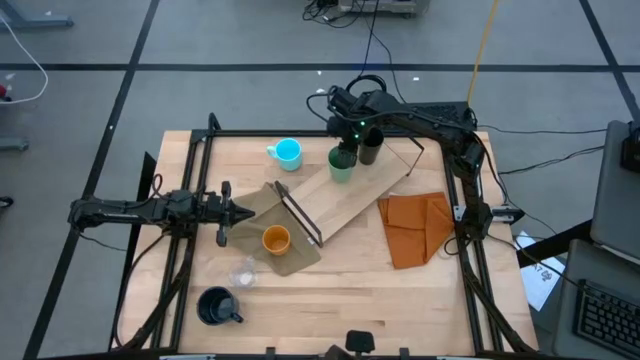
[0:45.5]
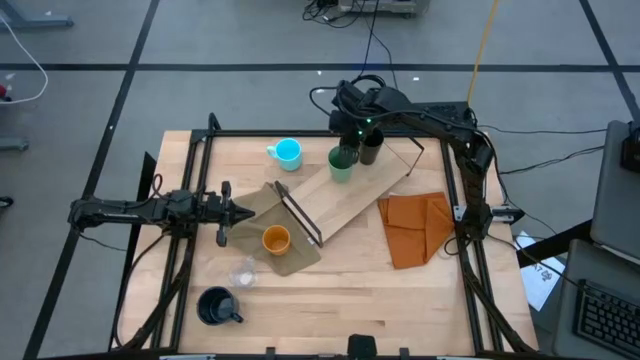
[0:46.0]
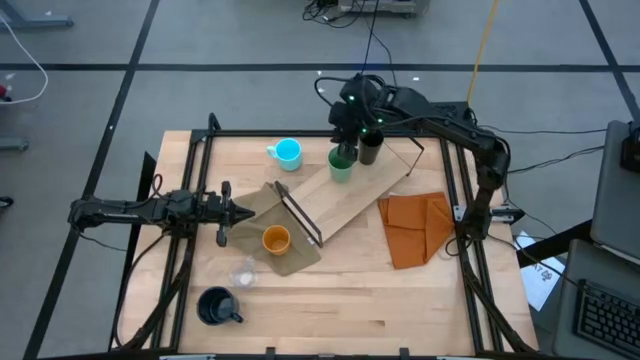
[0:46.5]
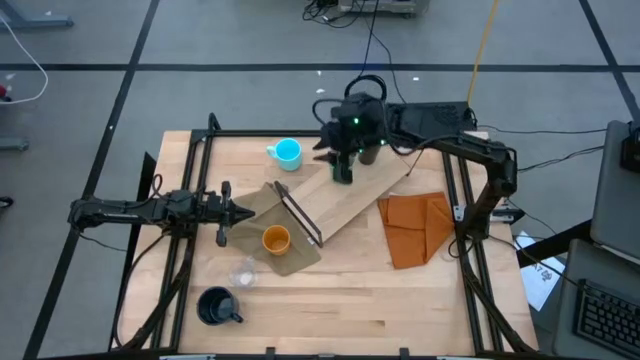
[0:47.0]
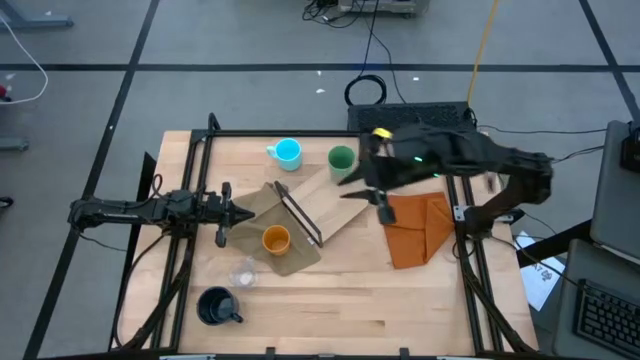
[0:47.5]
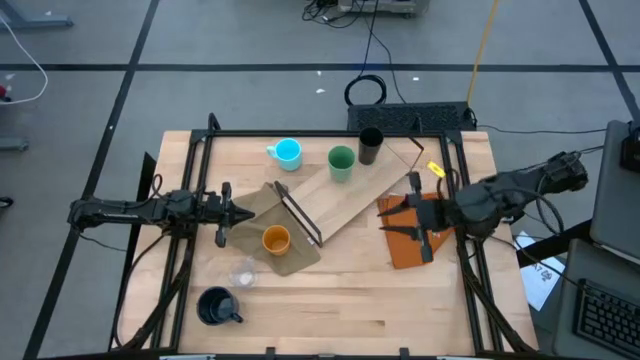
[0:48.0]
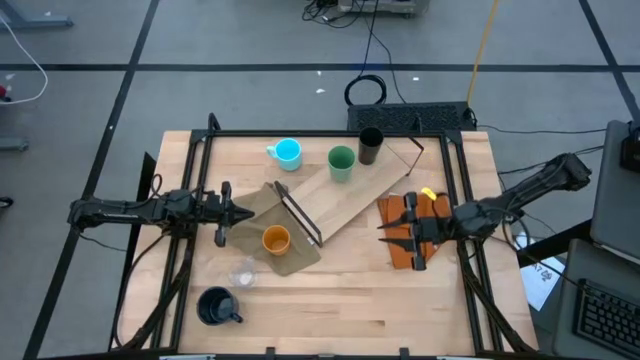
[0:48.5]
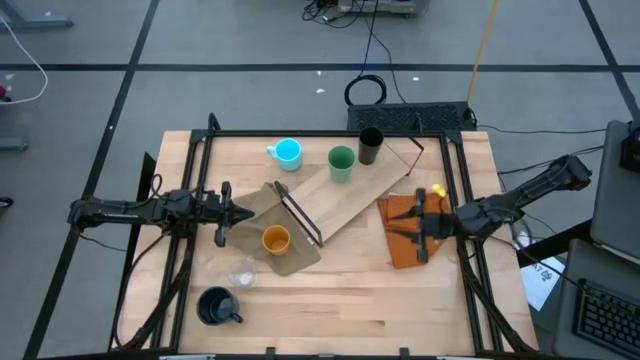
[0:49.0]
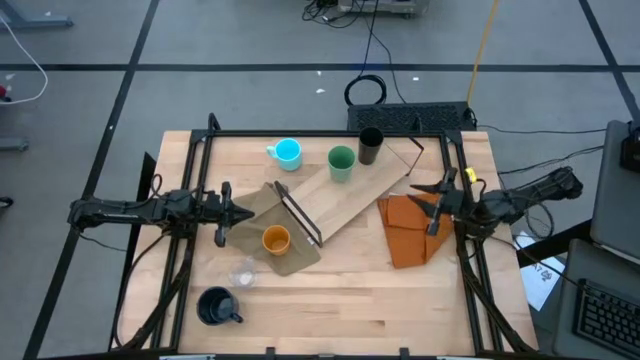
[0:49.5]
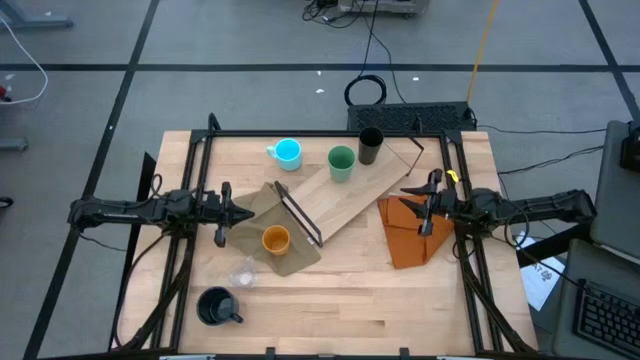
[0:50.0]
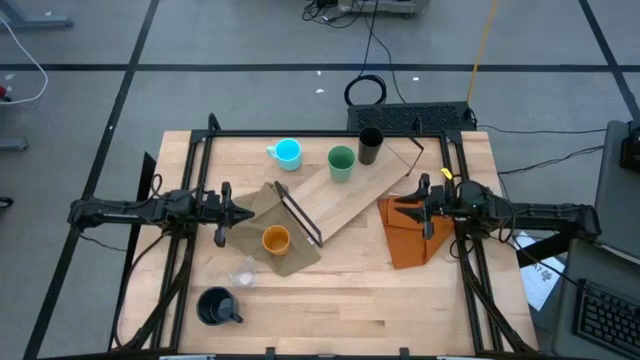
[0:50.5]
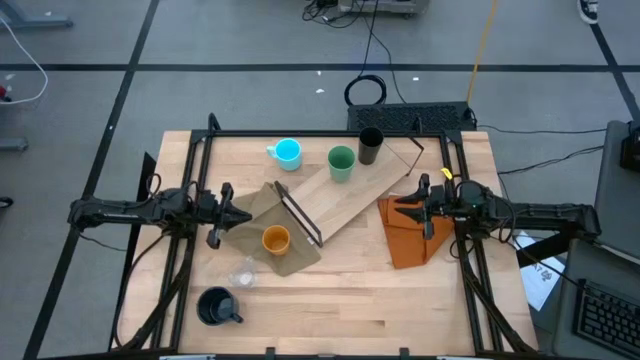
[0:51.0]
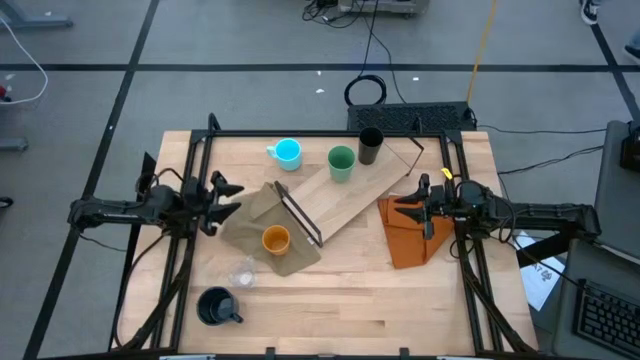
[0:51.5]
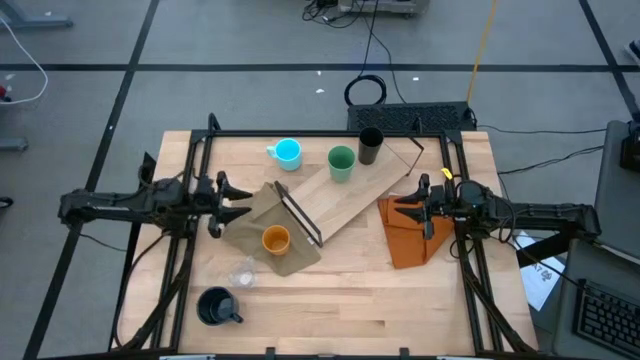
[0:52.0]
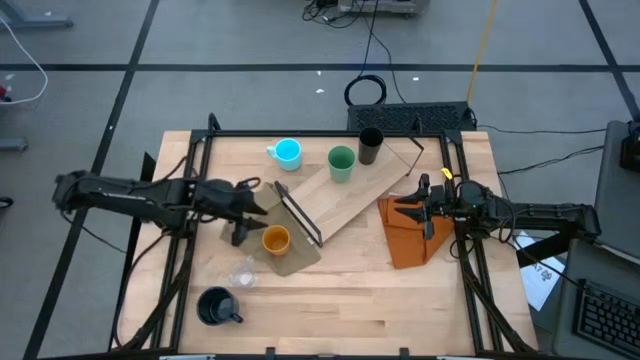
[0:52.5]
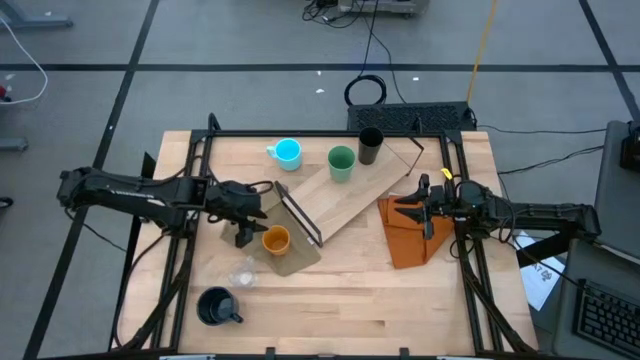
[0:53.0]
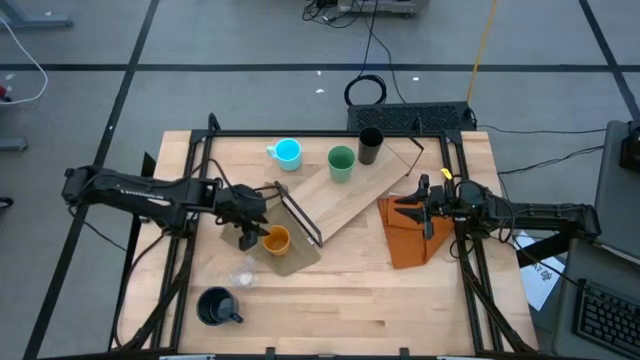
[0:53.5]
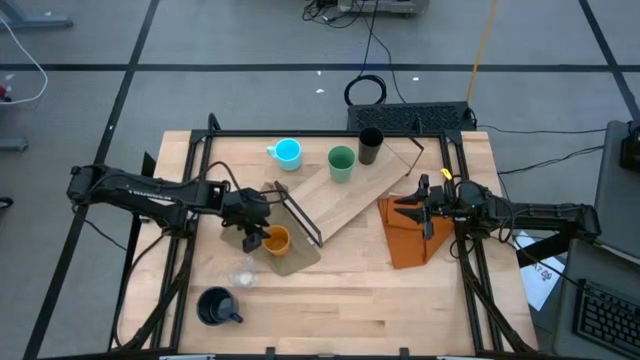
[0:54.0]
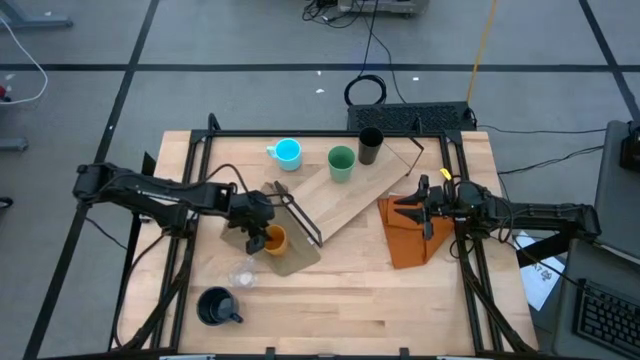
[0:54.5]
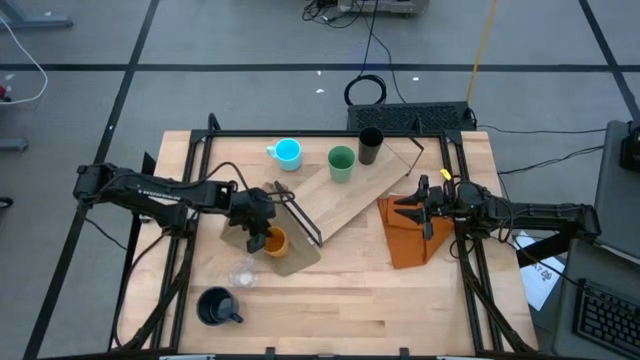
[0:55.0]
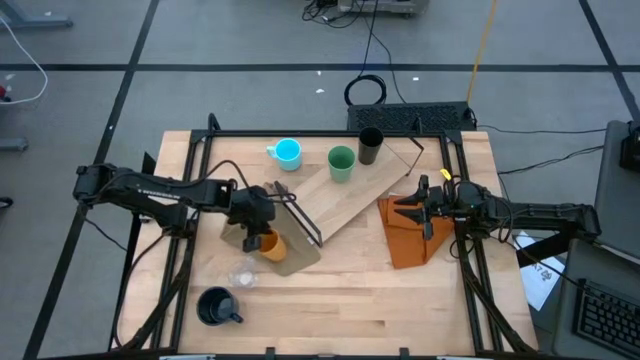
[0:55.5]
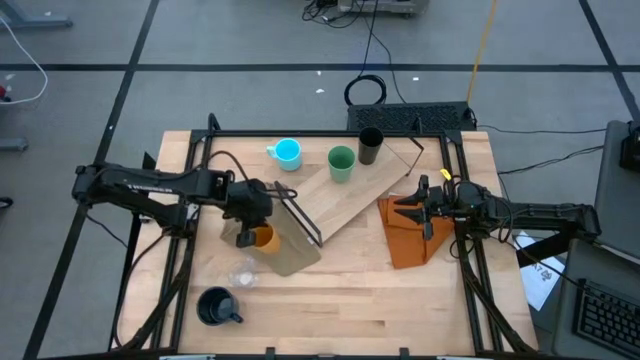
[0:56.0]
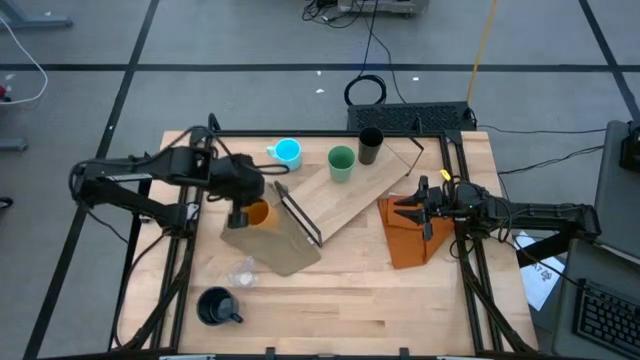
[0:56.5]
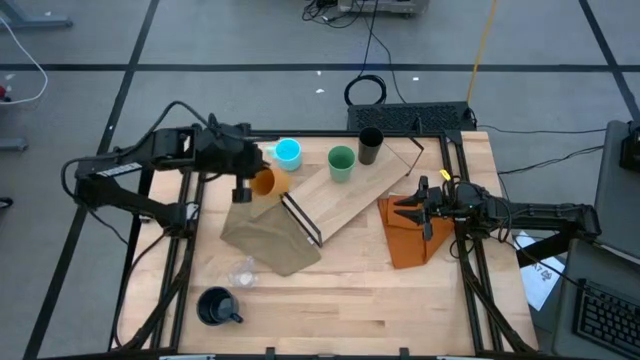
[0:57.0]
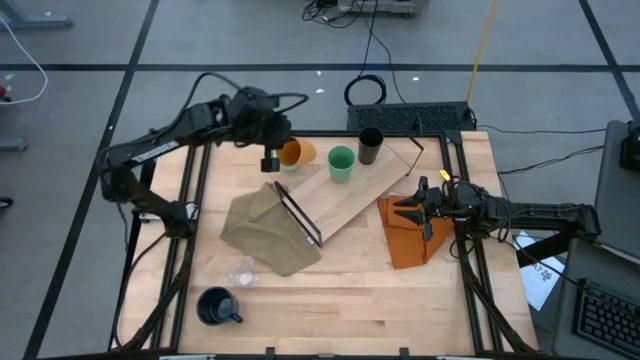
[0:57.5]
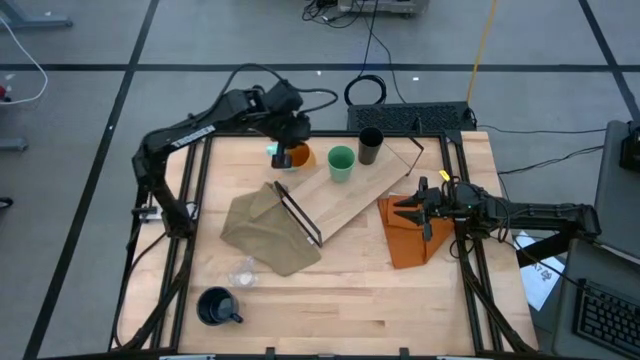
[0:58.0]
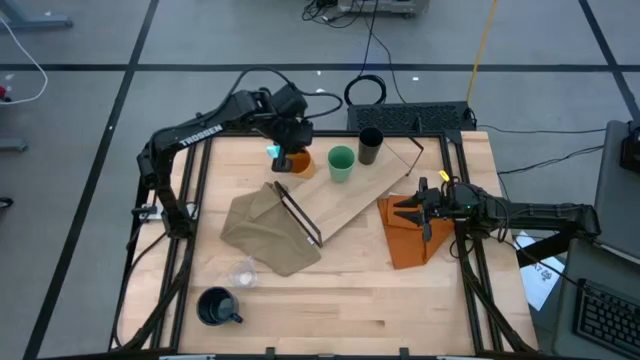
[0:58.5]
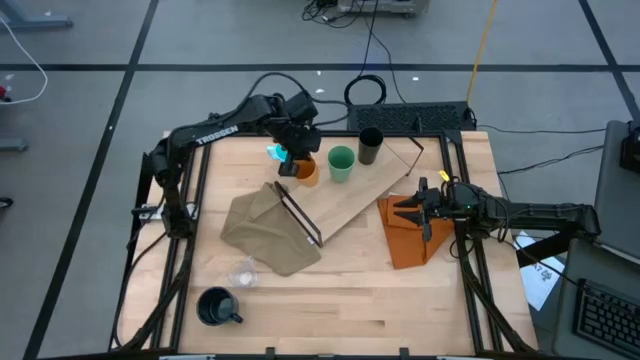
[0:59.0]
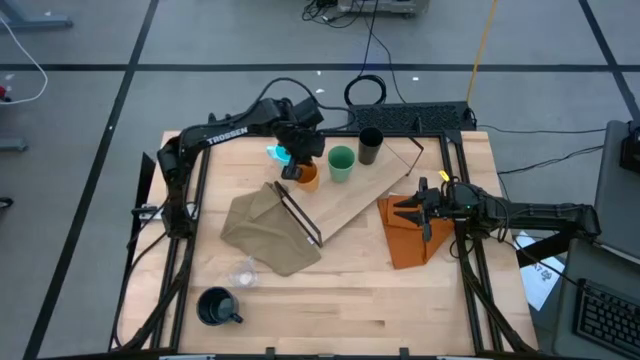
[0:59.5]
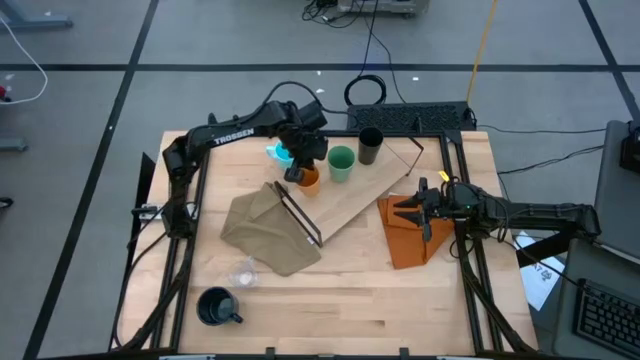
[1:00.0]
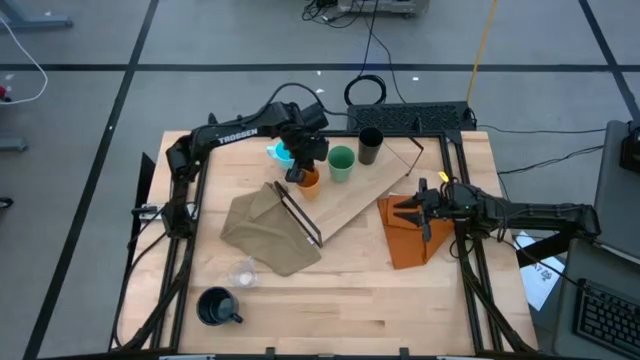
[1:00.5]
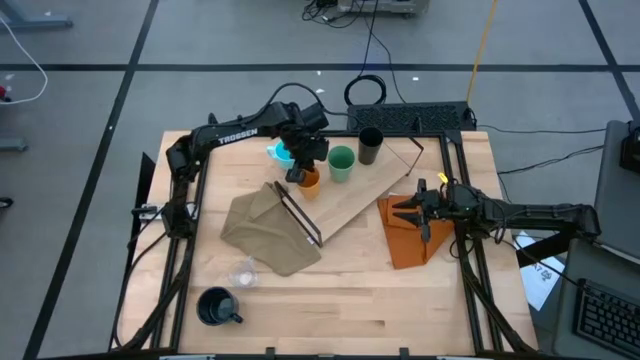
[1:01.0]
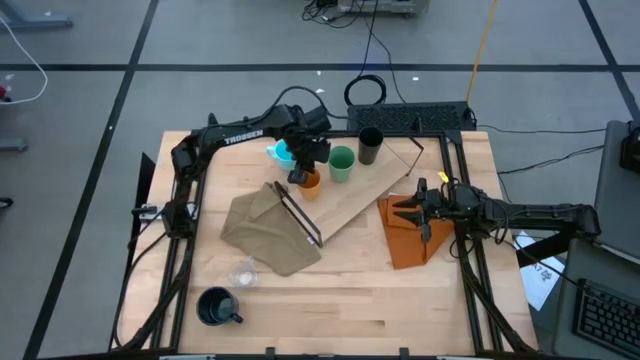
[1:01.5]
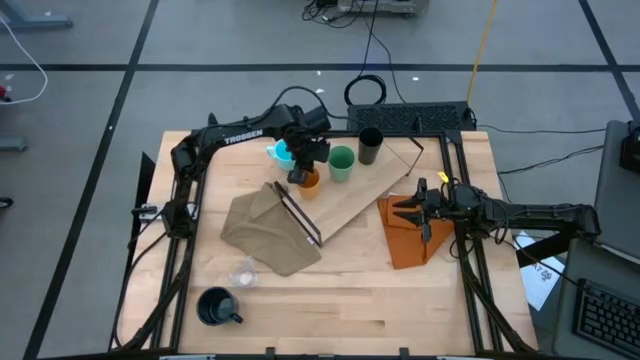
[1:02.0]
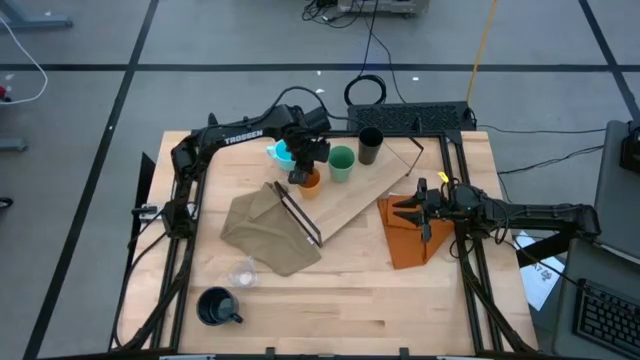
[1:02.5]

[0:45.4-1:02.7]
Task: Stack small to large cups/mugs on shelf
Put the orange cup on the shelf
